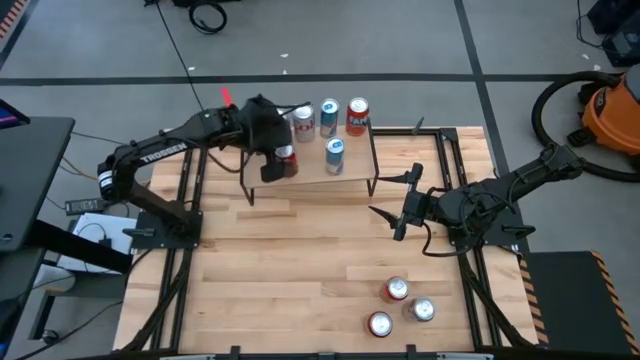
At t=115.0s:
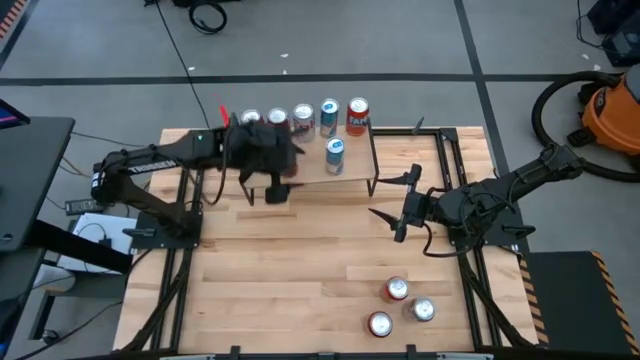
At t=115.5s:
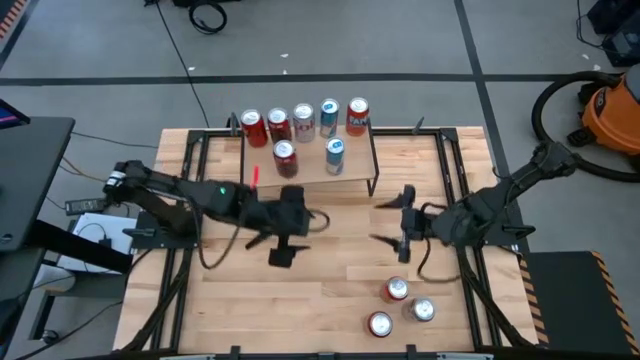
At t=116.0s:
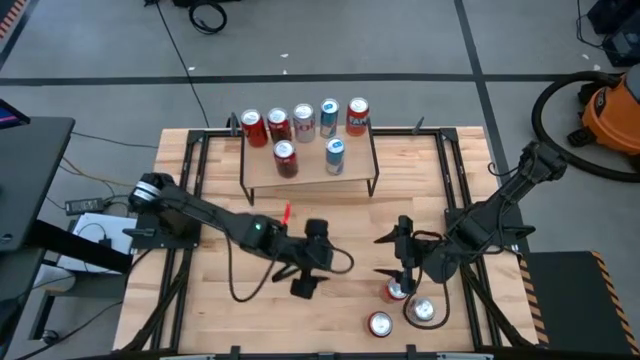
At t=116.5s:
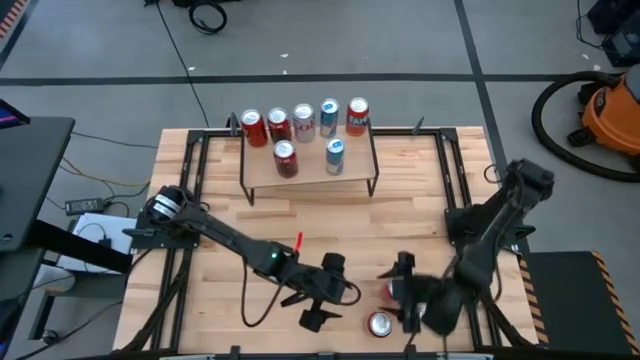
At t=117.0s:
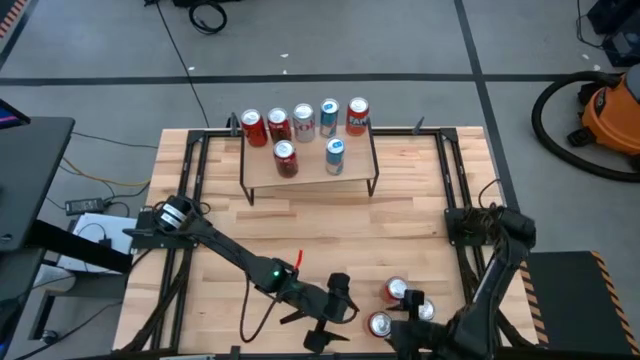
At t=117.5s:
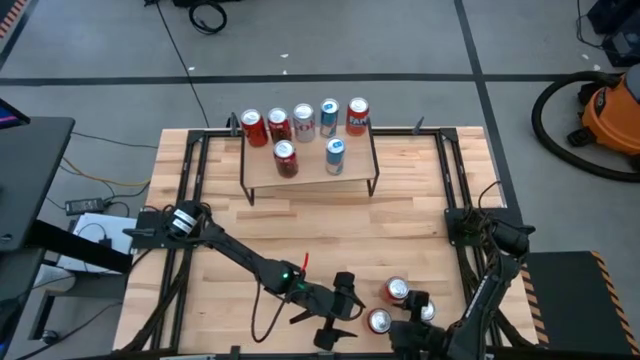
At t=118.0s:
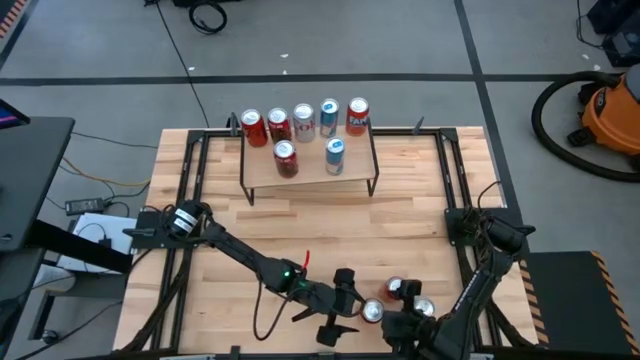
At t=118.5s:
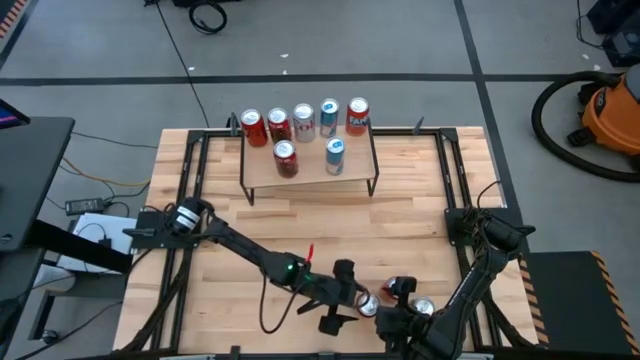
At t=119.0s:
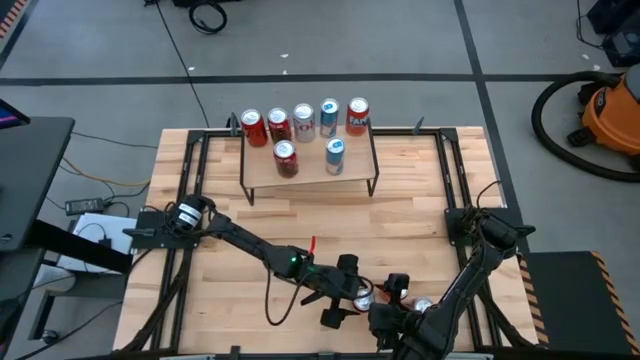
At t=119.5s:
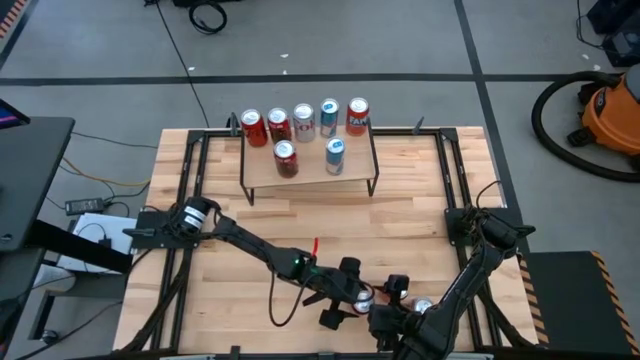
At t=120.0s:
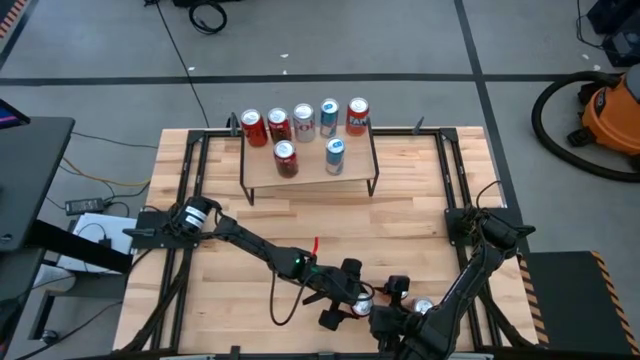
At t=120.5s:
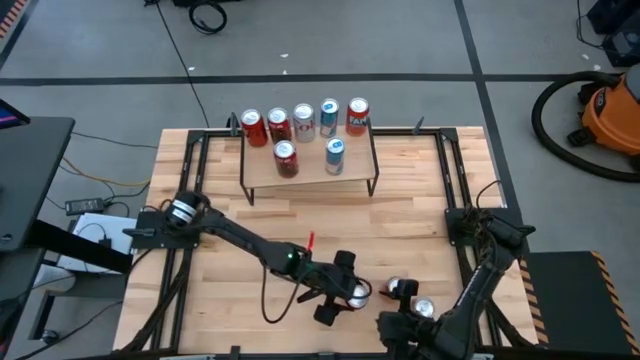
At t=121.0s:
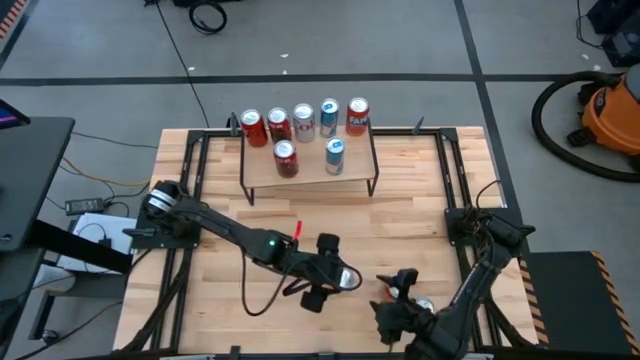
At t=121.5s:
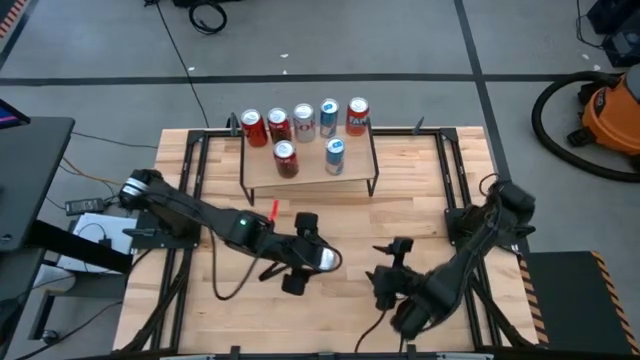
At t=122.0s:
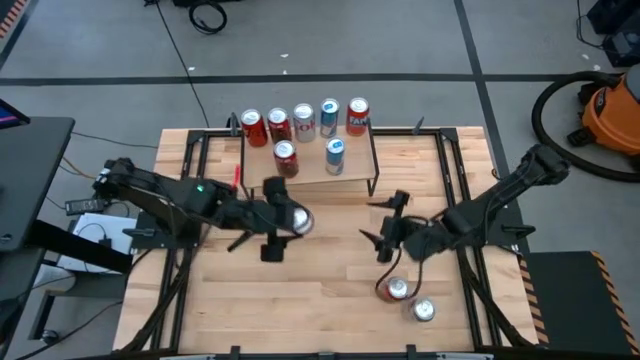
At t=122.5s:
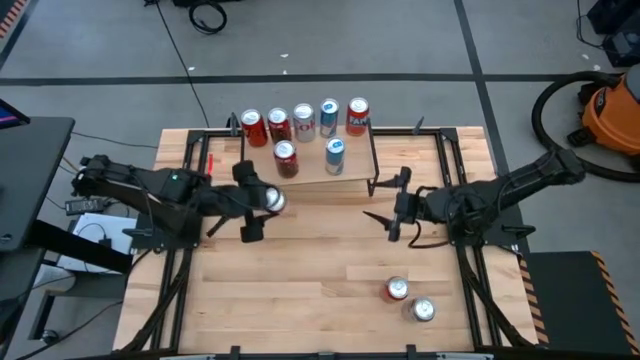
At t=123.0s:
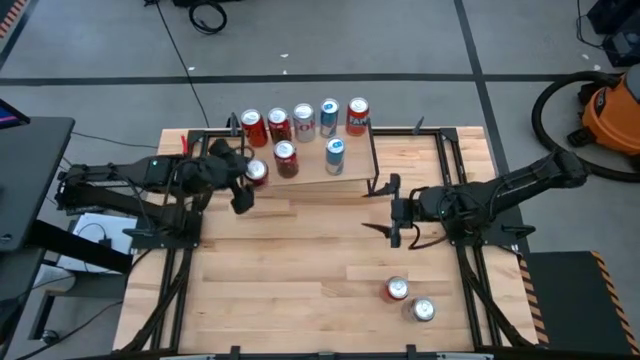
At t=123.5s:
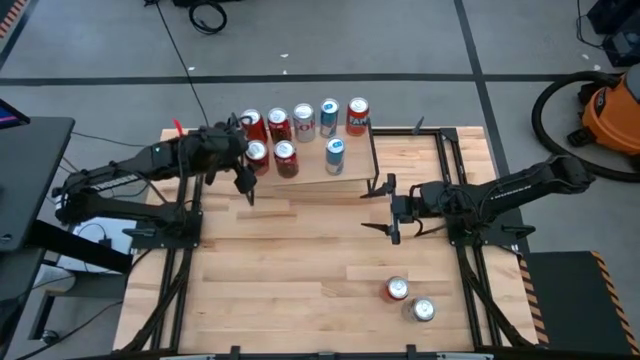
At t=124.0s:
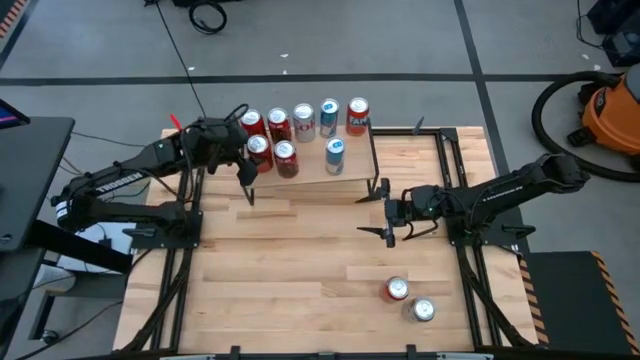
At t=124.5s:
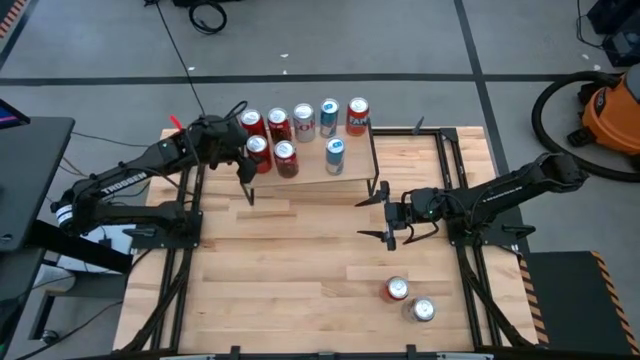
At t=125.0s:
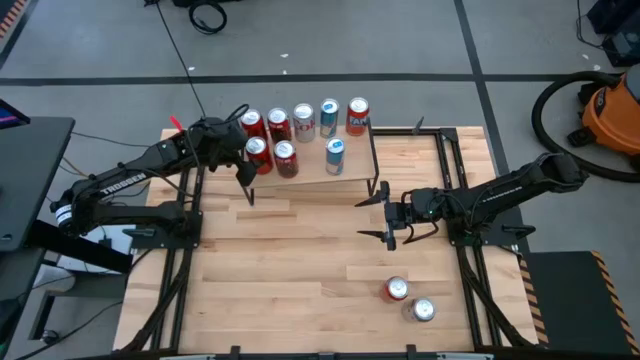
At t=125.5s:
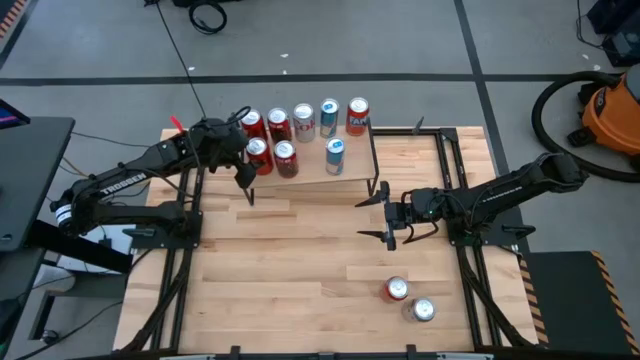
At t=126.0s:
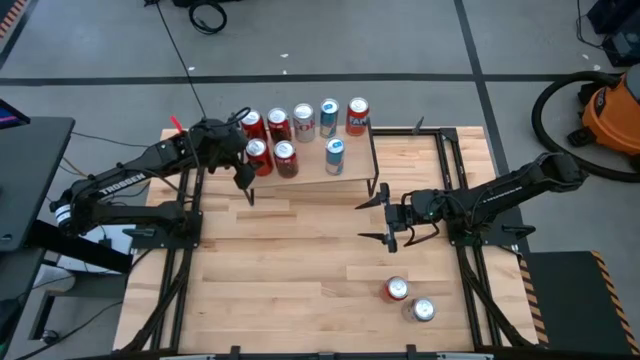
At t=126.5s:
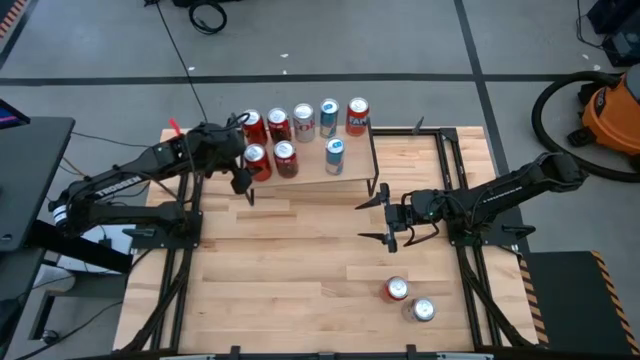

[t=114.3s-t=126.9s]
Task: Place canned beverage on shelf
Put the black soda can on the shelf aligned with the other black soda can

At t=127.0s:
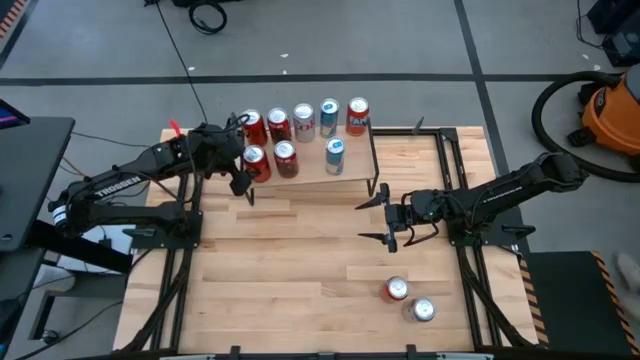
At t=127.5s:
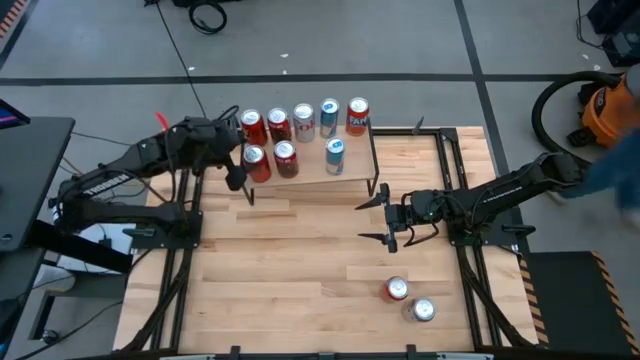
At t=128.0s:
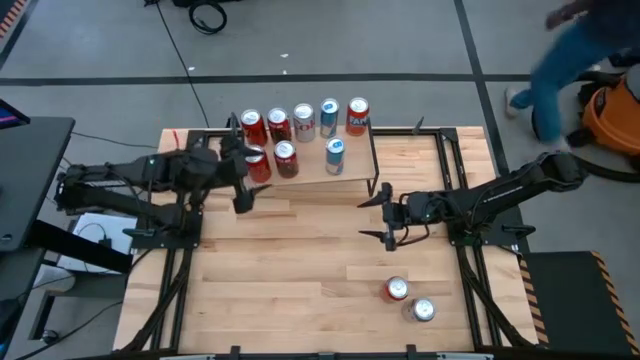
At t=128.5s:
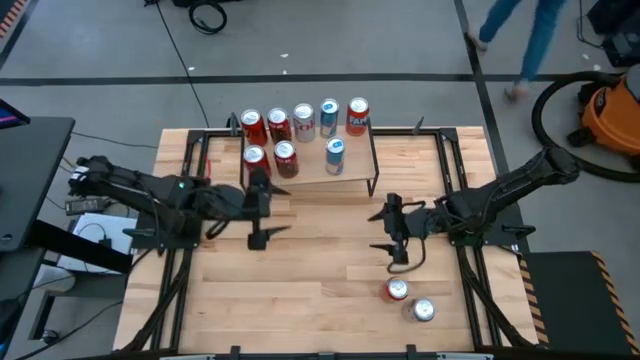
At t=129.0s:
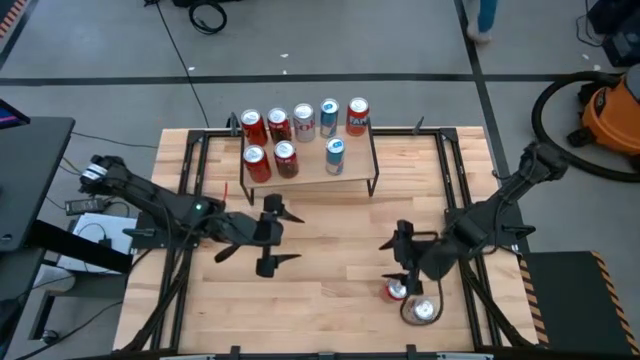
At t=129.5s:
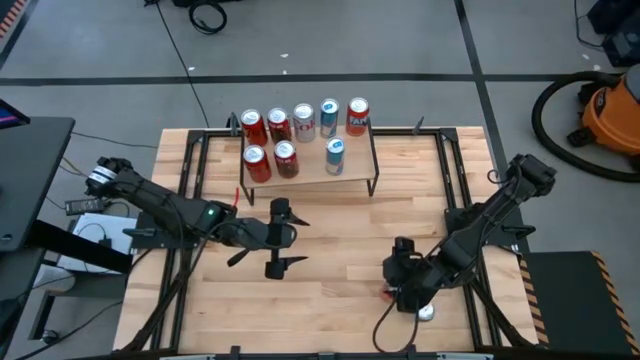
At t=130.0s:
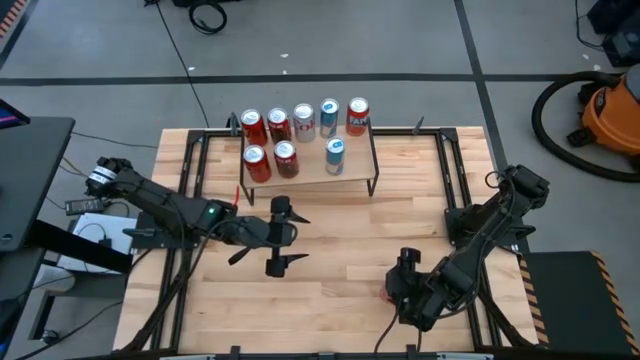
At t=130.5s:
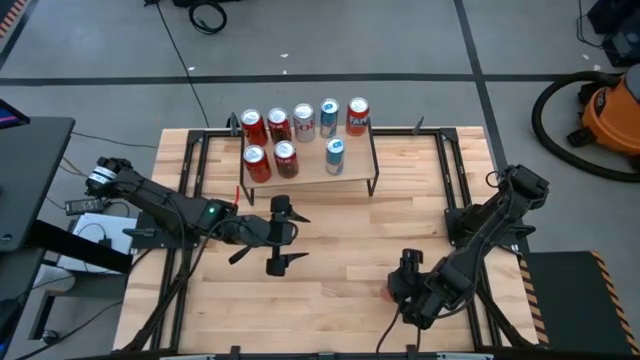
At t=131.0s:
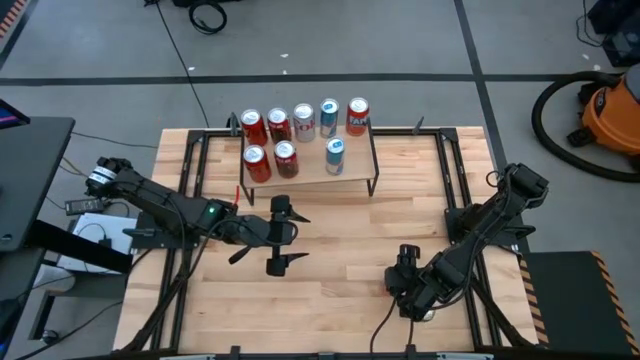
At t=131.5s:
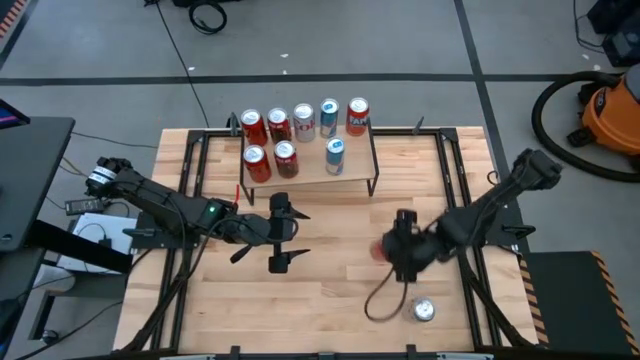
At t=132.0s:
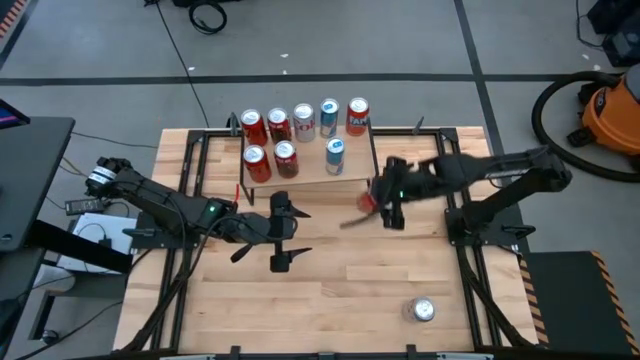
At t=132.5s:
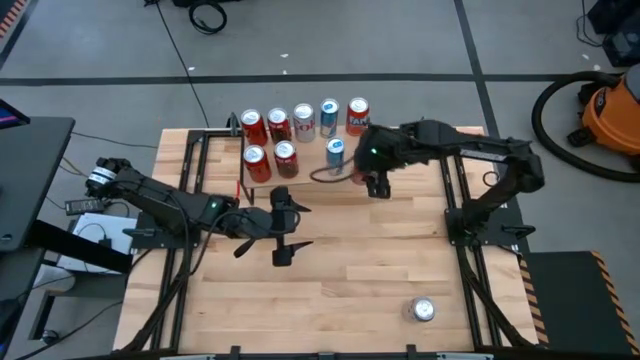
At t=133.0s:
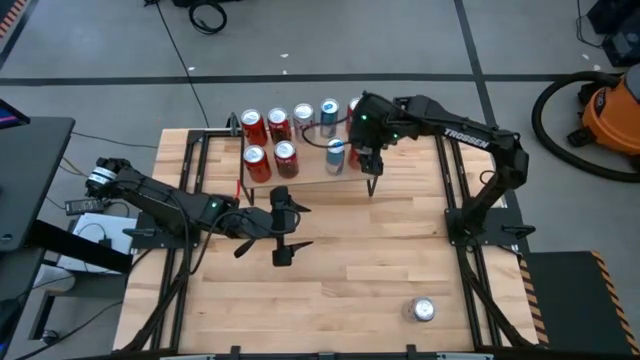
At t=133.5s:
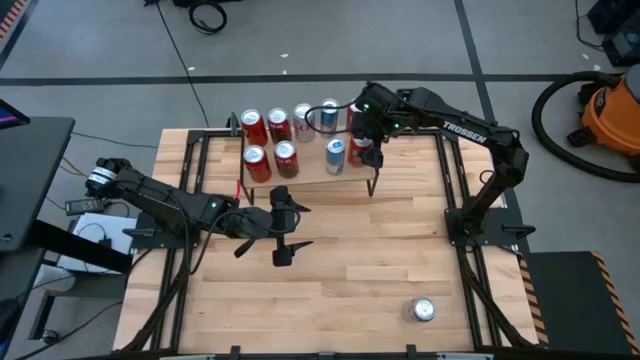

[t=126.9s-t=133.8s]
Put the orange soda can on the shelf aligned with the other orange soda can

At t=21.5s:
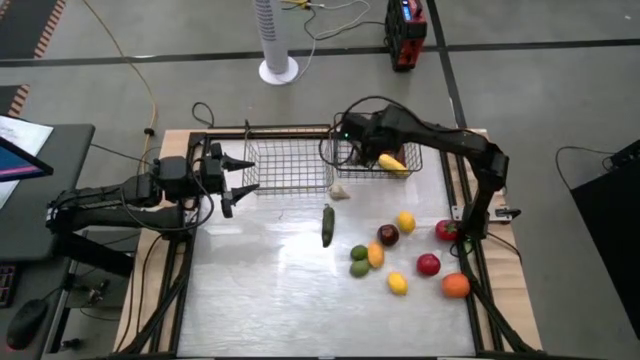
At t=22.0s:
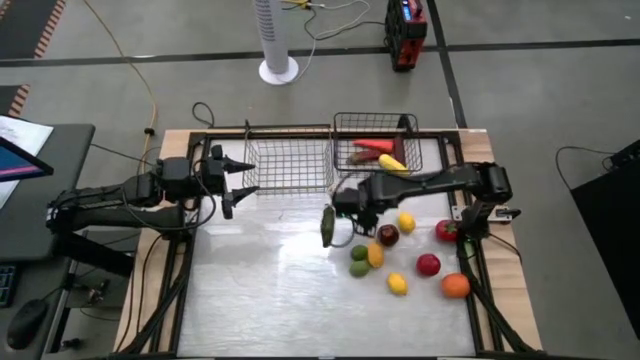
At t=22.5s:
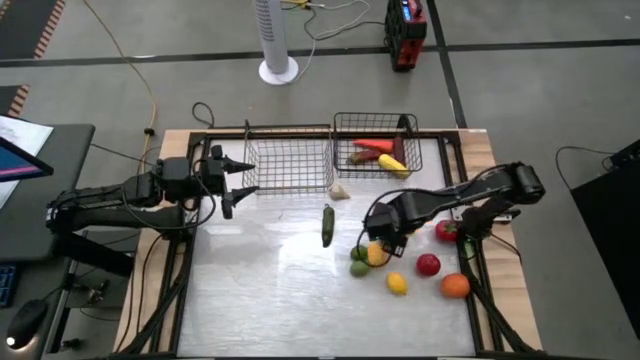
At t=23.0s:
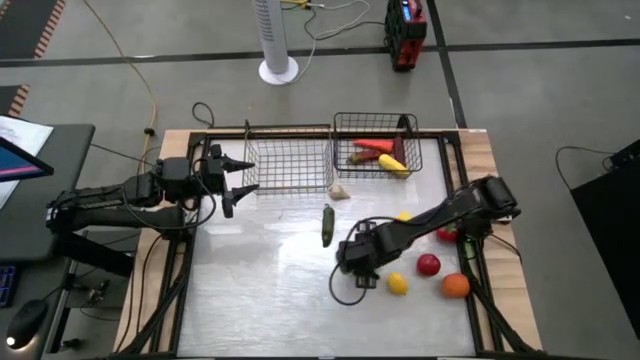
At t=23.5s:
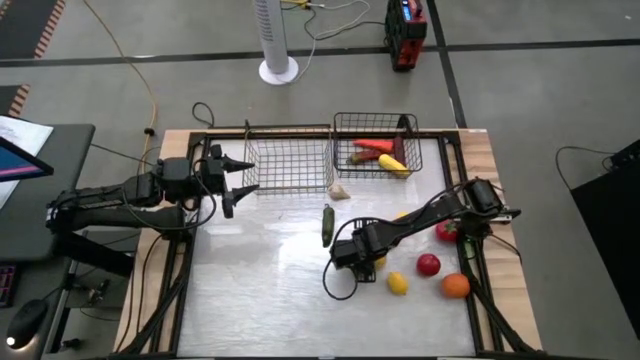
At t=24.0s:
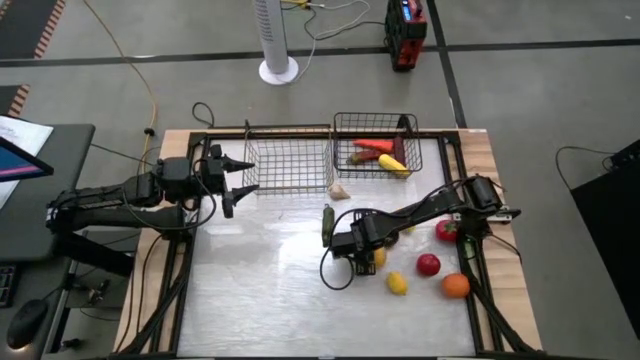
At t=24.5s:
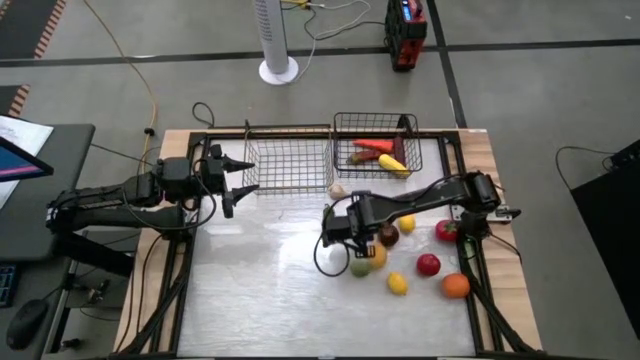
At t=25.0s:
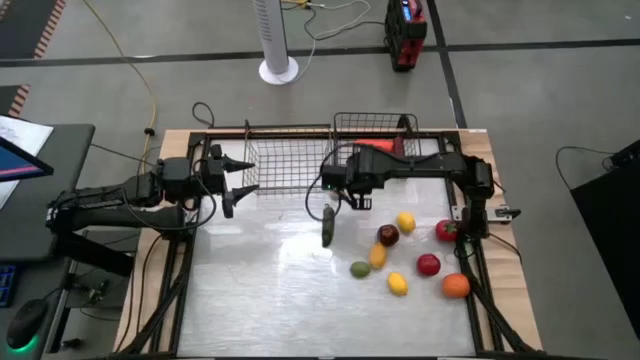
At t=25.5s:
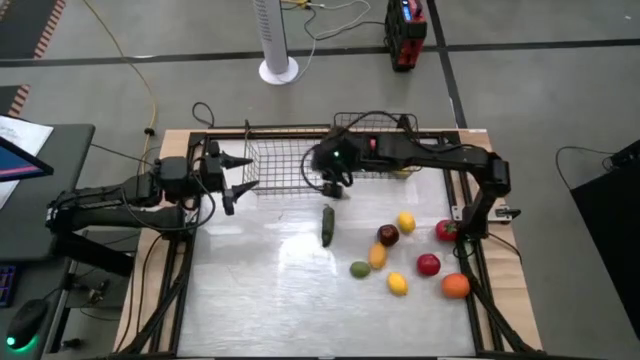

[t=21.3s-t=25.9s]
Task: Sort produce into baskets
Put the lime into the left wire basket
